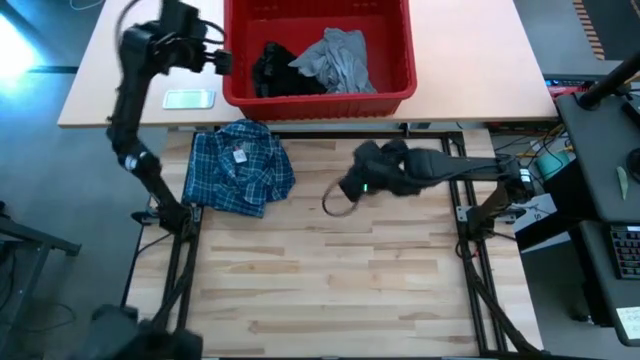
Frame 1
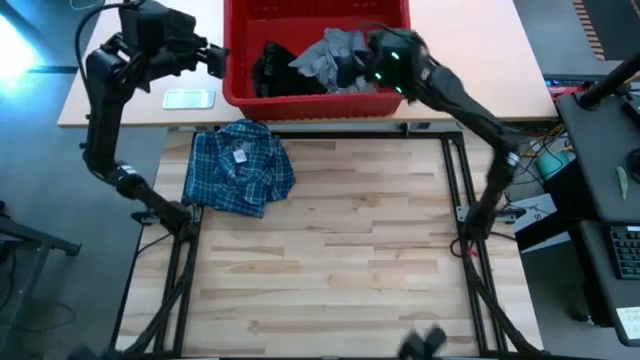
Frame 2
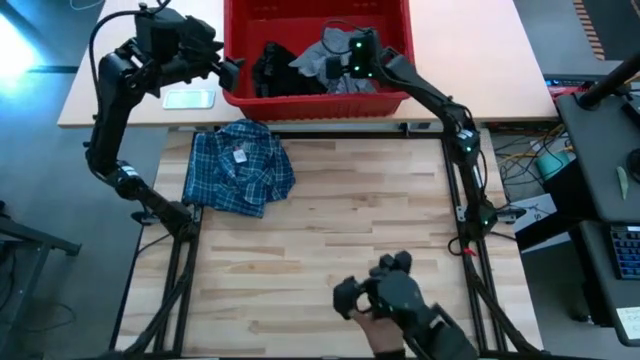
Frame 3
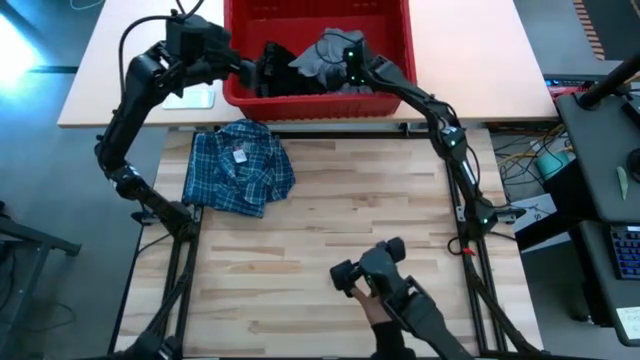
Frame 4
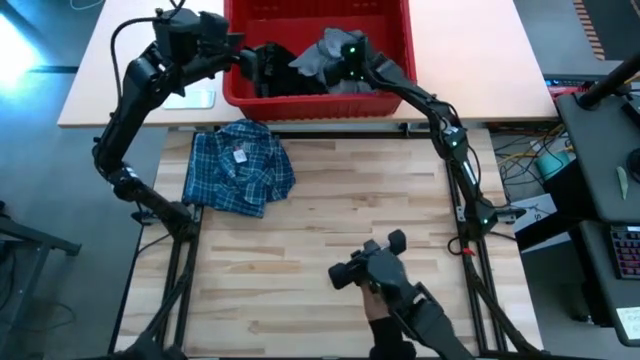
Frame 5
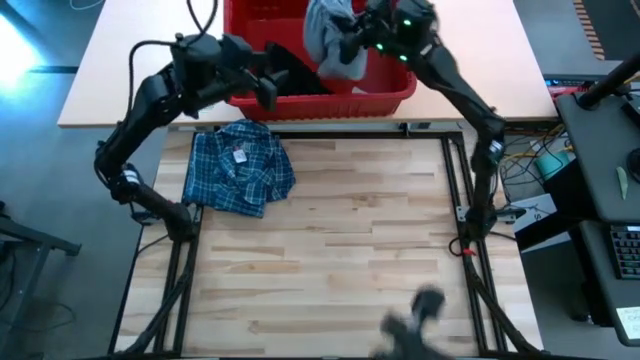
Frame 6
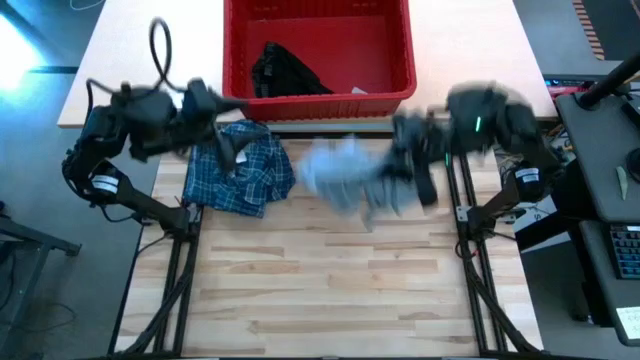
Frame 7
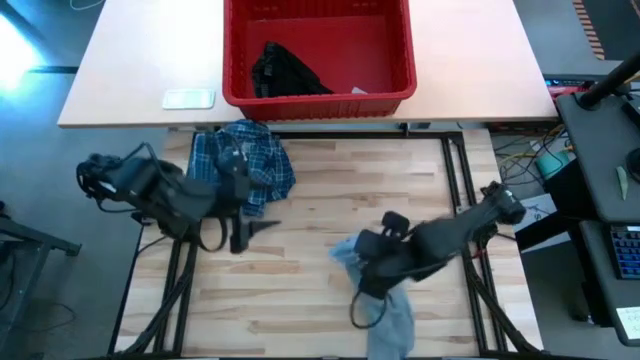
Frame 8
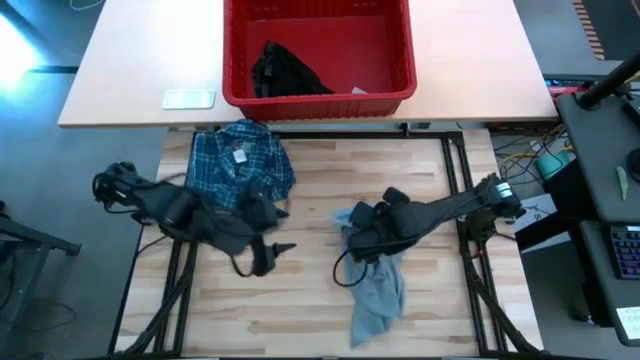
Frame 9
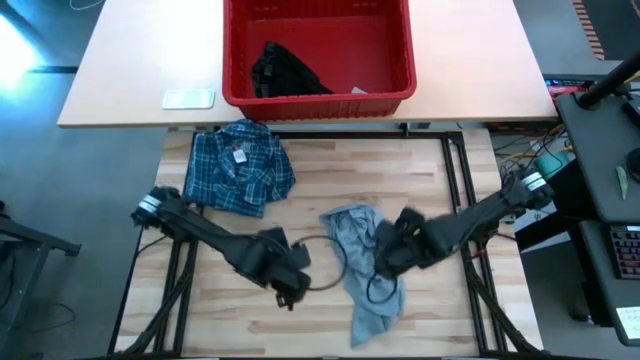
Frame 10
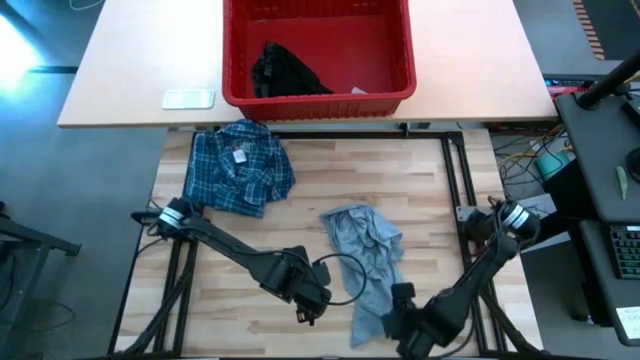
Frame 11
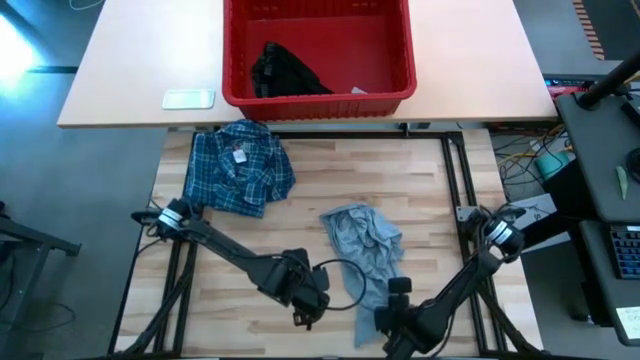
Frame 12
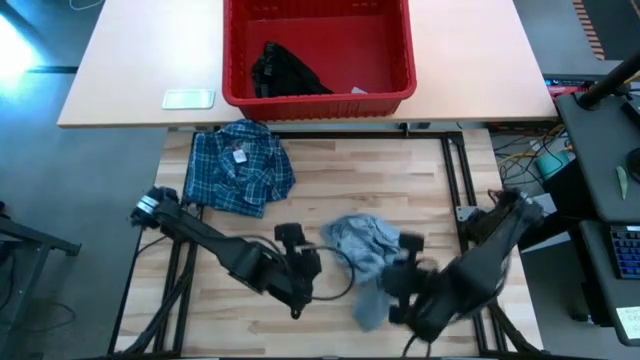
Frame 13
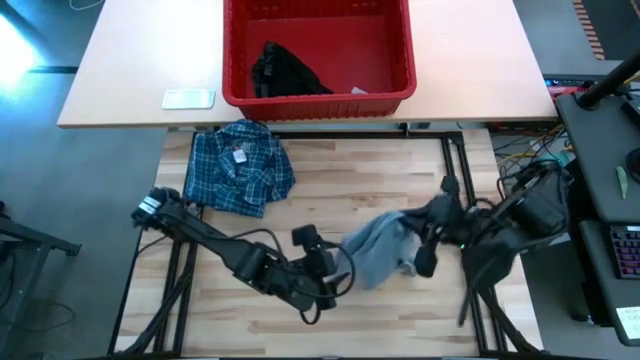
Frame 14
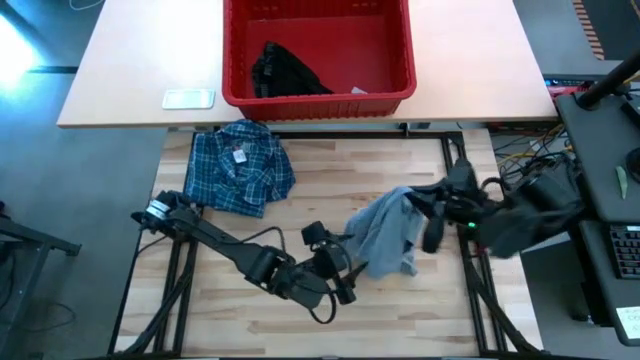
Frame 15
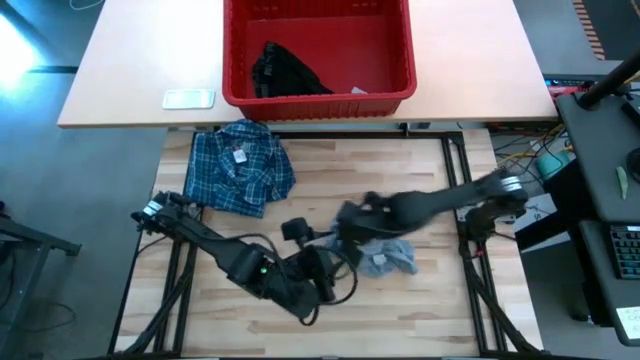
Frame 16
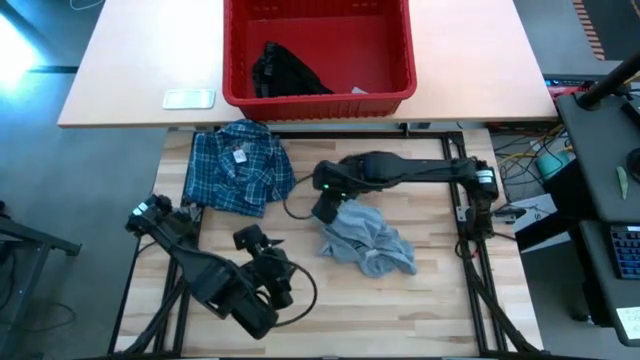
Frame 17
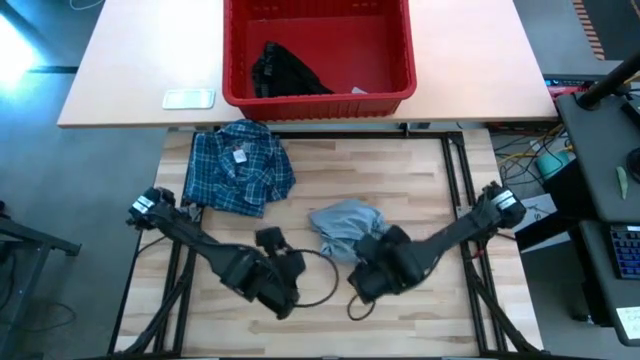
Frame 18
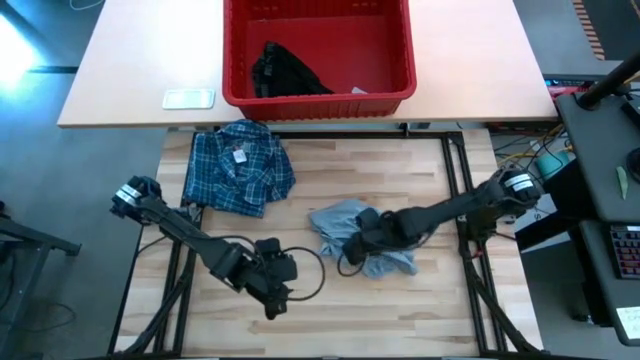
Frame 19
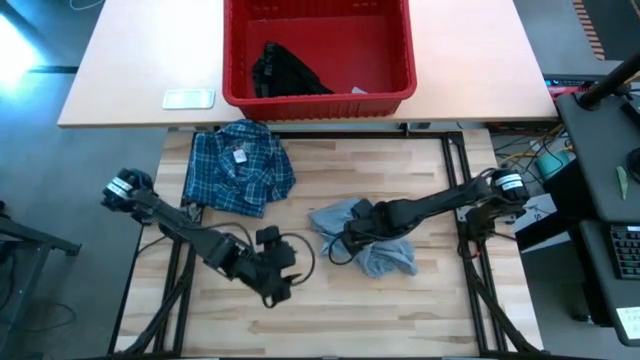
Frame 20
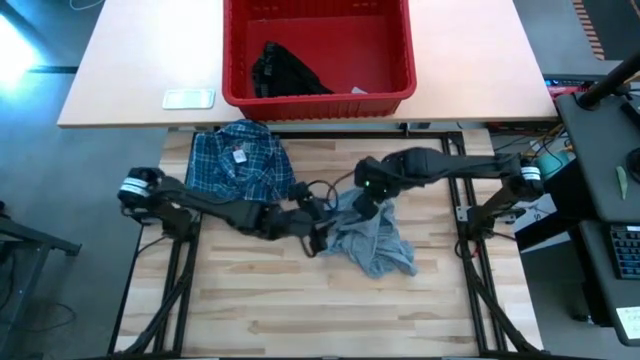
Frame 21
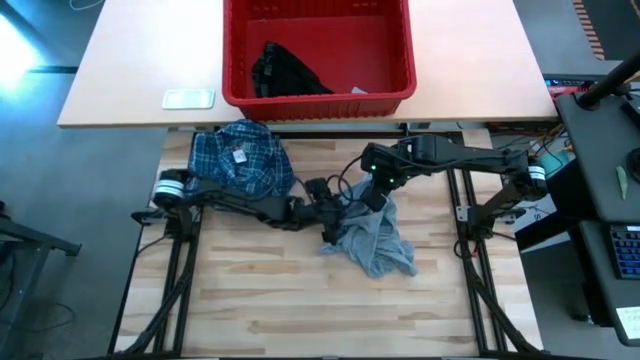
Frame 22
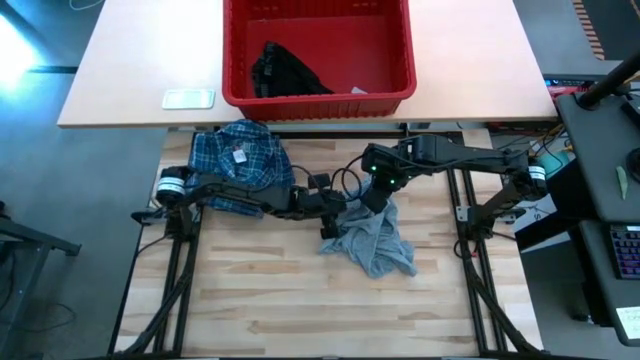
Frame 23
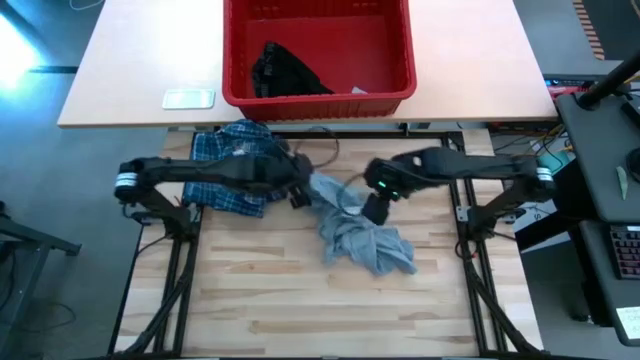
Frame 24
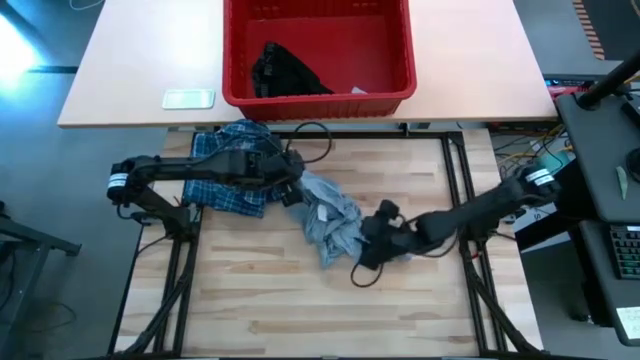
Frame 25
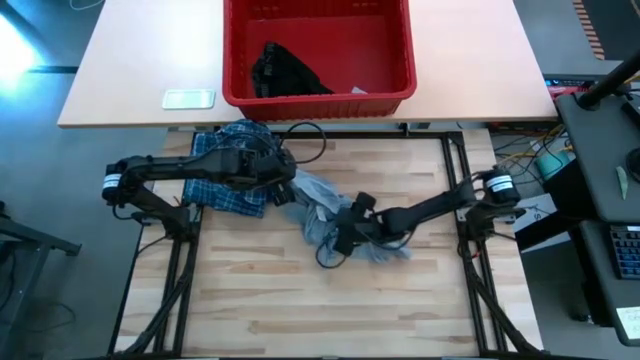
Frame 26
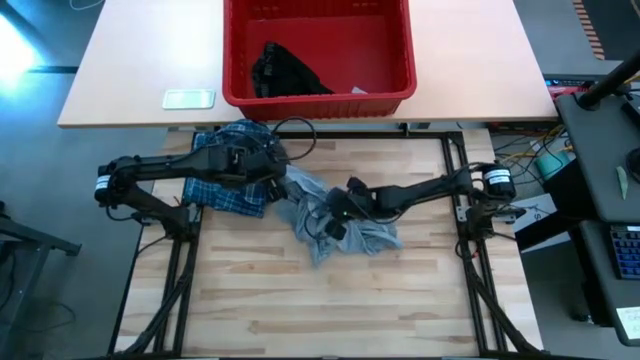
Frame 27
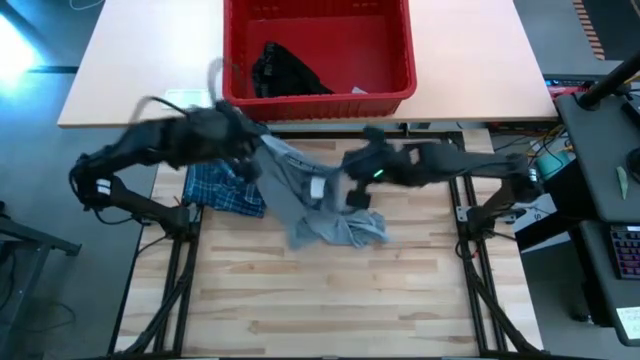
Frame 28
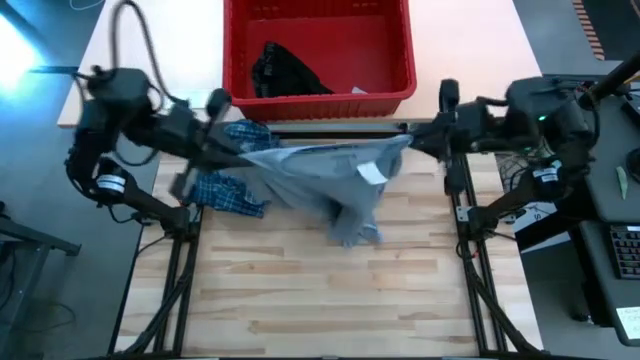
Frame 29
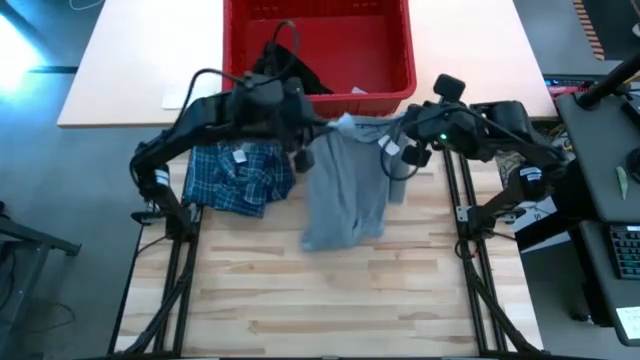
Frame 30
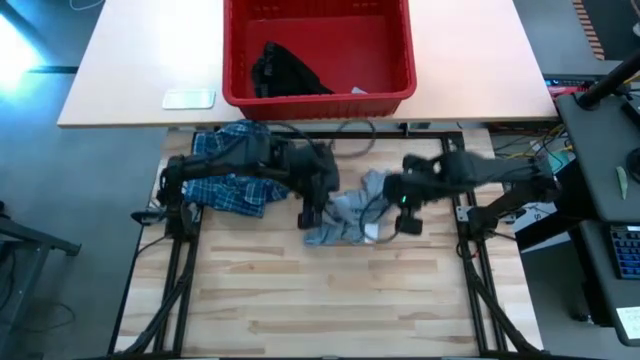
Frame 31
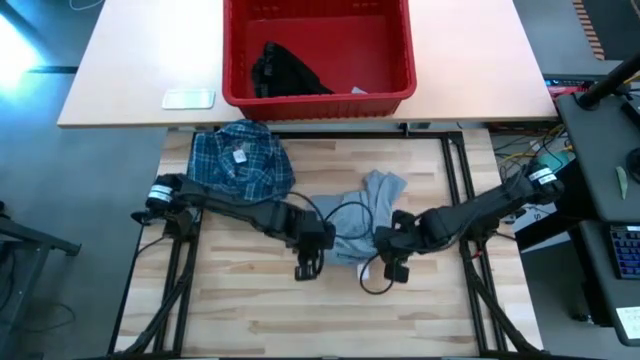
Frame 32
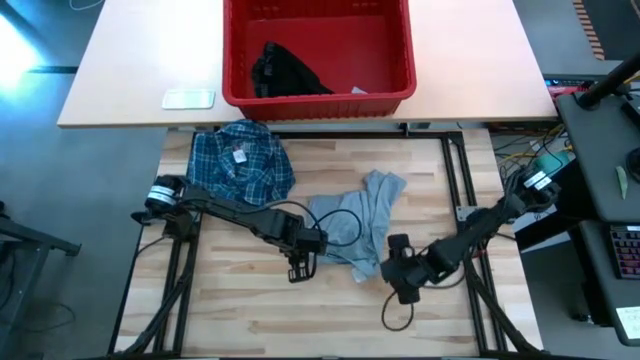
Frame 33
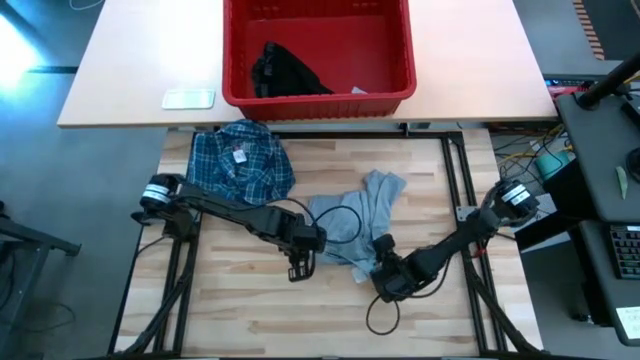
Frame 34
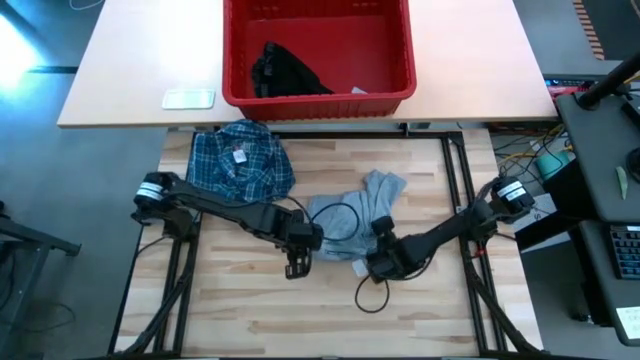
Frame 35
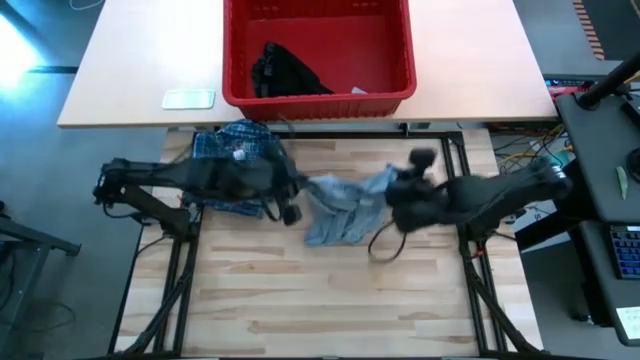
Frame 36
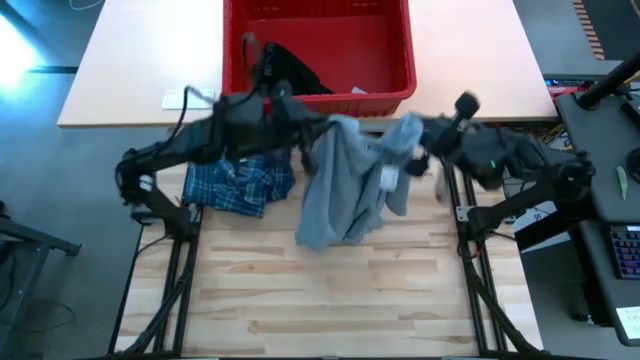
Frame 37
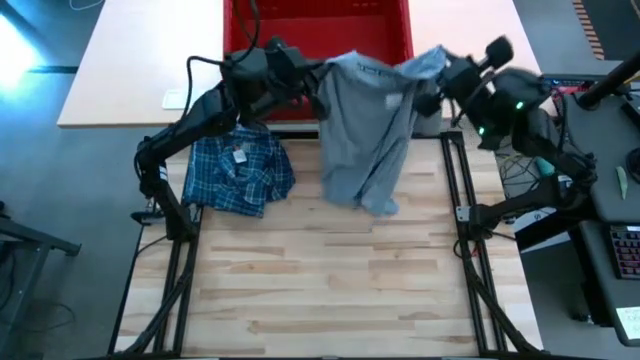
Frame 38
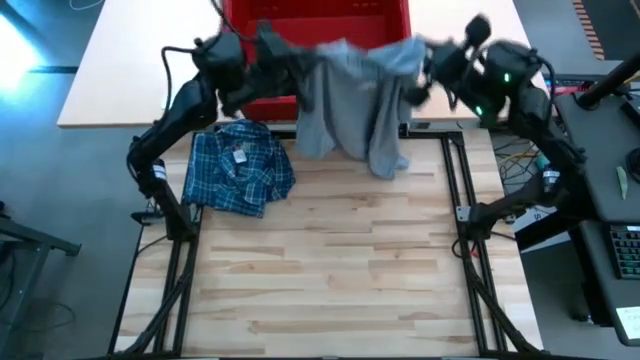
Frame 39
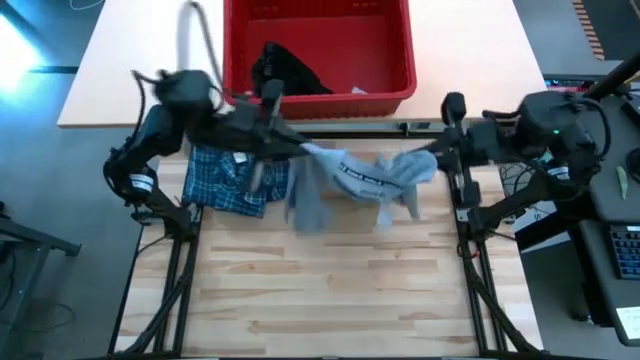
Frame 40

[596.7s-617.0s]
Task: Fold Laundry from Bin
Fold the gray shirt
